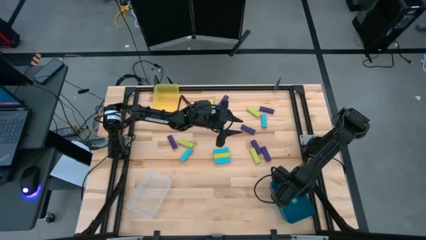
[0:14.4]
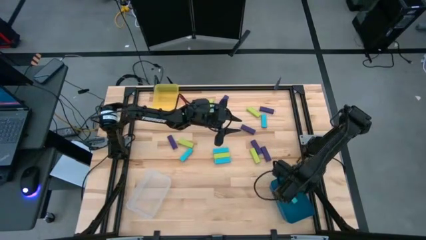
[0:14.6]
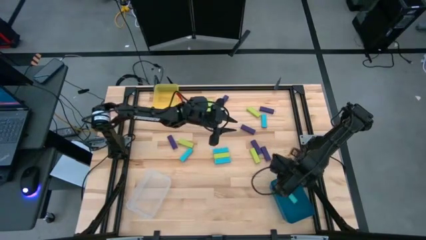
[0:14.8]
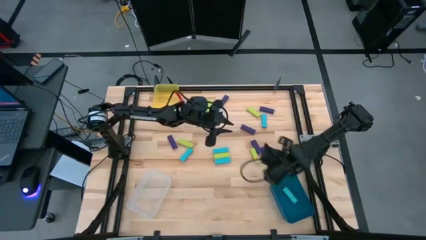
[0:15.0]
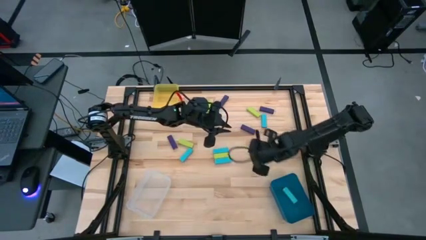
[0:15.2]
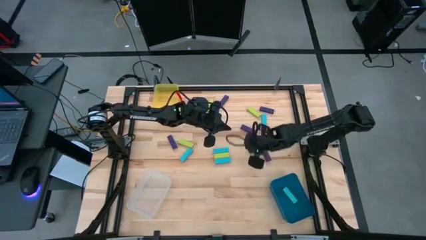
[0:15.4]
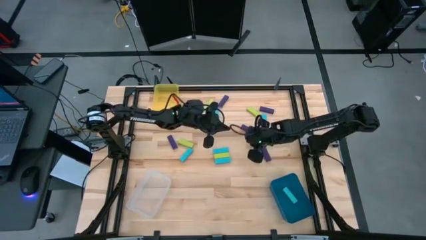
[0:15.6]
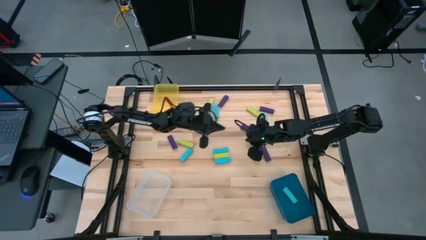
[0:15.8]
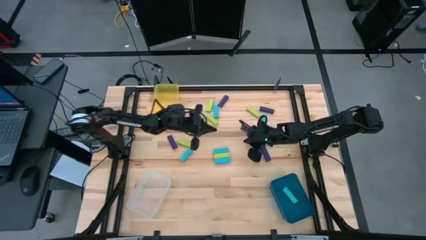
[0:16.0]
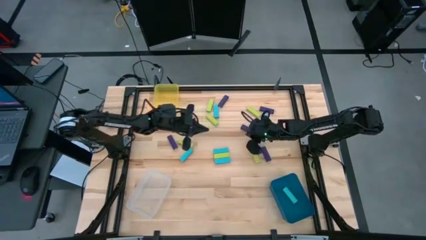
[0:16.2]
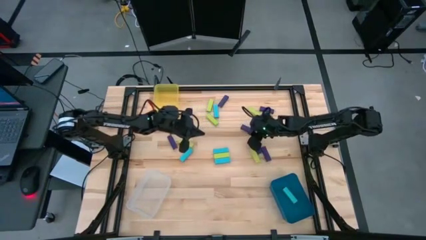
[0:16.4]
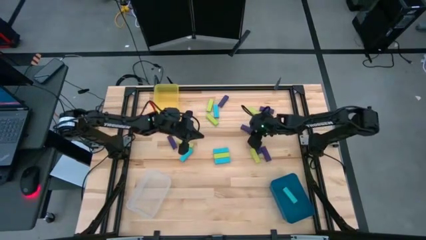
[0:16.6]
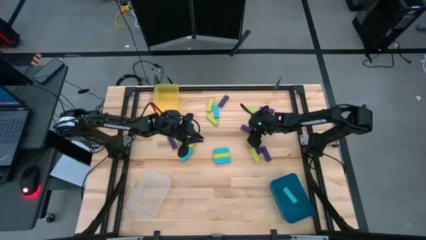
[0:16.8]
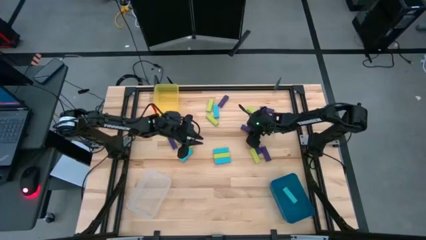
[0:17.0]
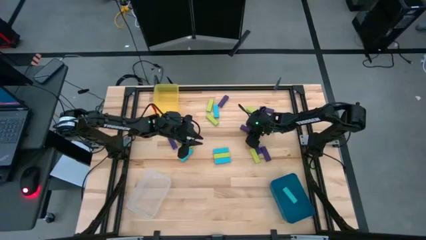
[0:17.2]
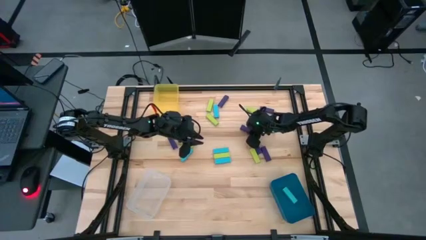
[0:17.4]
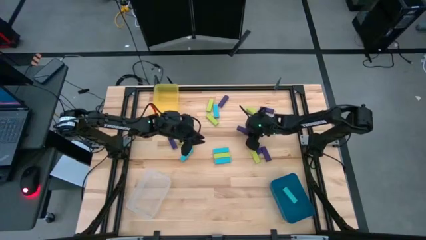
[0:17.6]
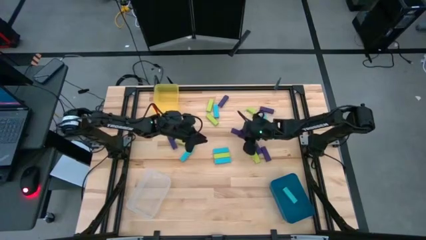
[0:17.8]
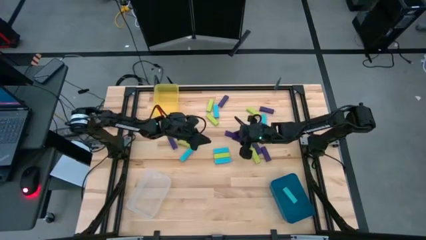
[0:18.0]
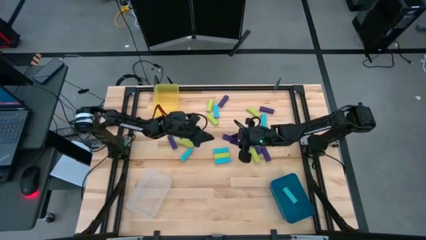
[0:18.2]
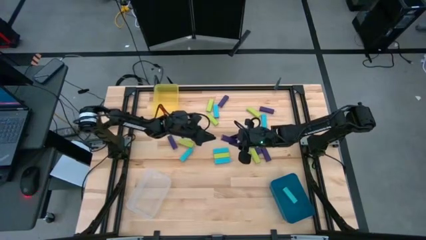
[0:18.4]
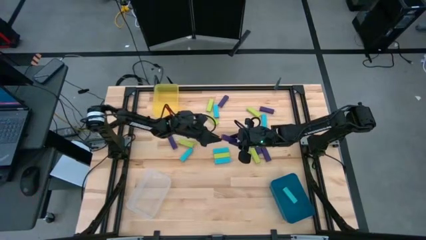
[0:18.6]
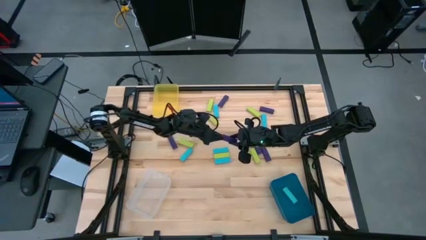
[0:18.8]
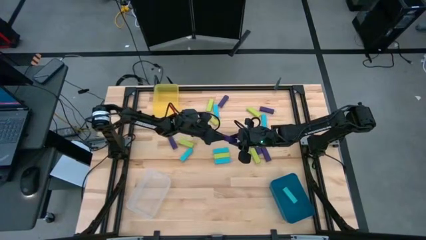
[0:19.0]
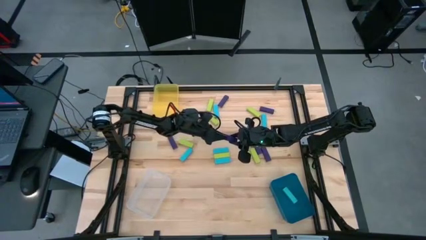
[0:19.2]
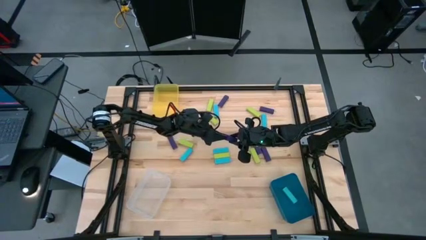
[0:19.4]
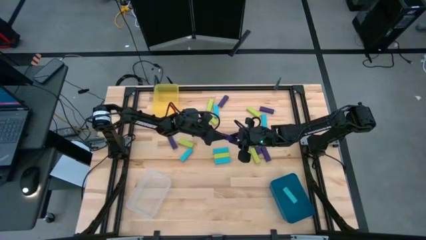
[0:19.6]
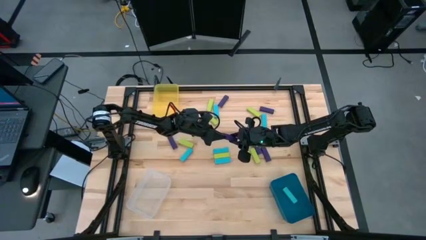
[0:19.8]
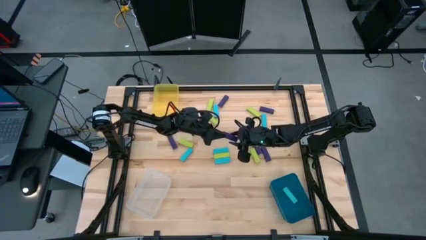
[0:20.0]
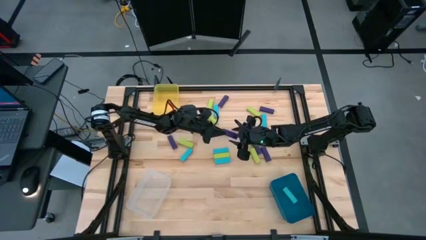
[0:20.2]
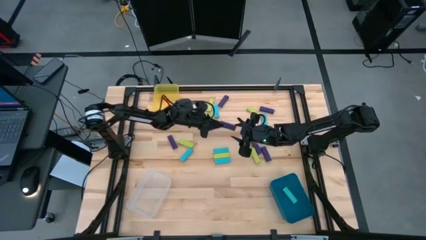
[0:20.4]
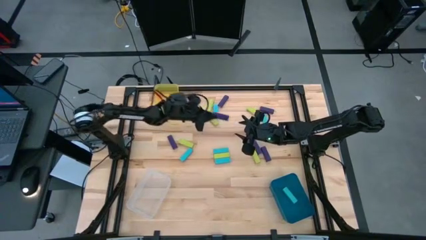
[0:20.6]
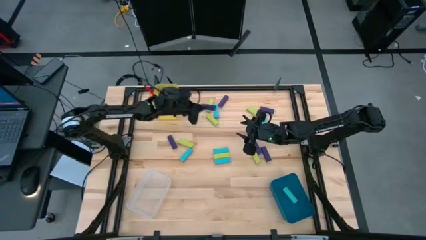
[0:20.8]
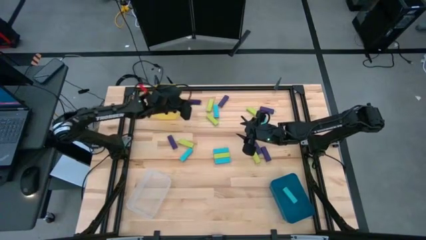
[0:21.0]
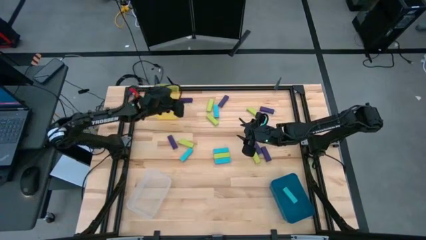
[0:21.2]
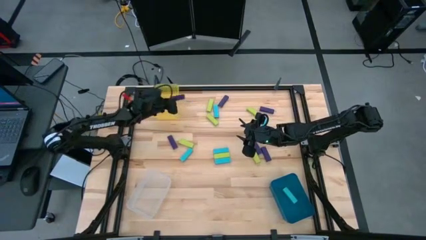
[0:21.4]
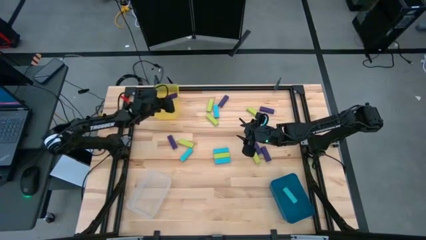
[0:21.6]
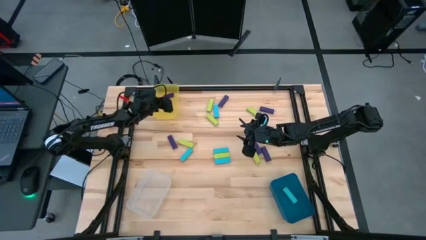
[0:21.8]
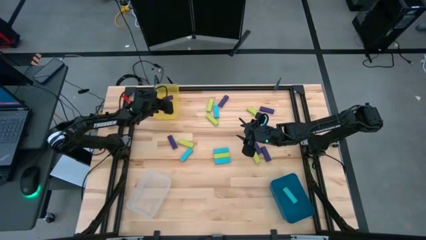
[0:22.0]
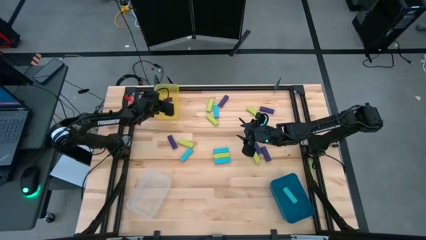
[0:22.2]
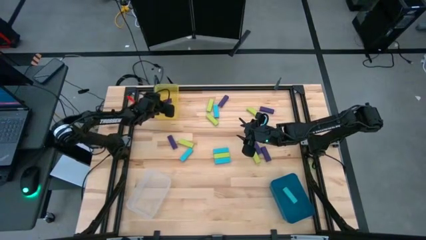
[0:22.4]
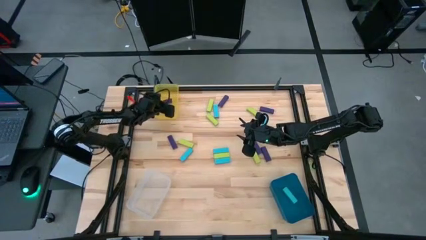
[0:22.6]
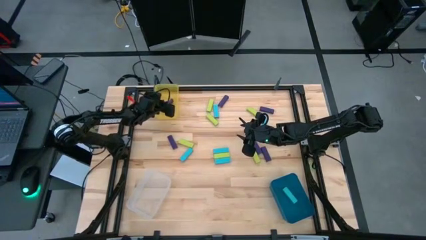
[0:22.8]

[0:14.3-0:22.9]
Task: Sort blocks
Put the violet block into the yellow bin

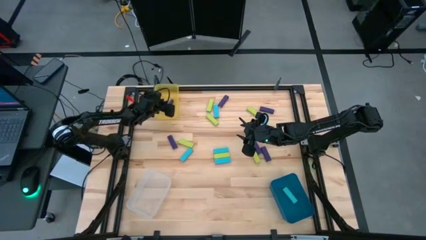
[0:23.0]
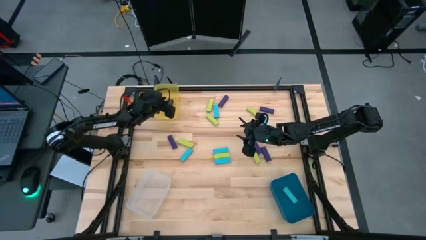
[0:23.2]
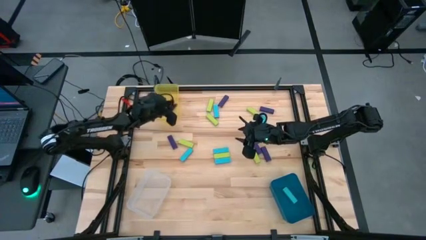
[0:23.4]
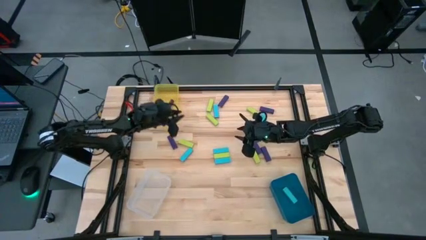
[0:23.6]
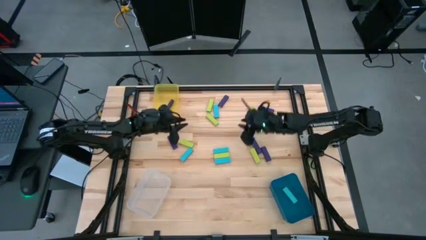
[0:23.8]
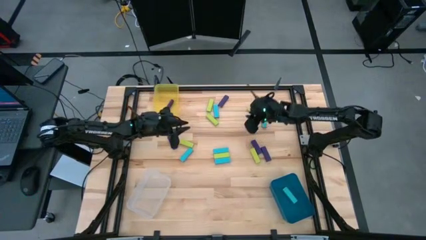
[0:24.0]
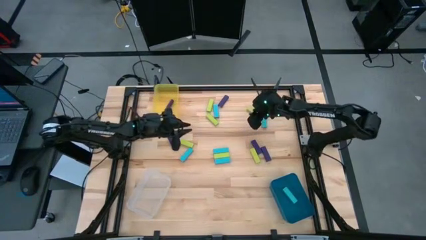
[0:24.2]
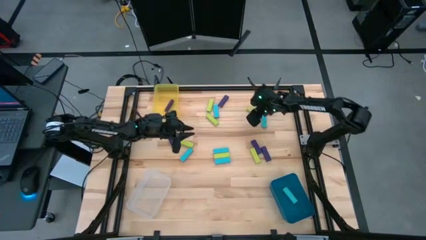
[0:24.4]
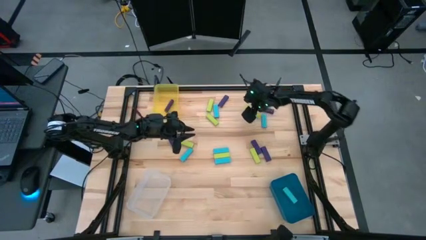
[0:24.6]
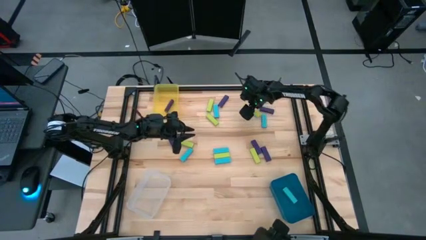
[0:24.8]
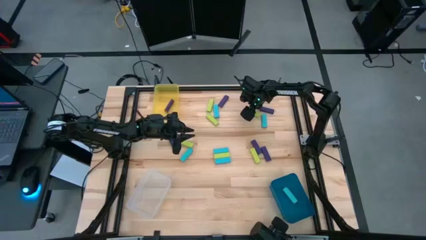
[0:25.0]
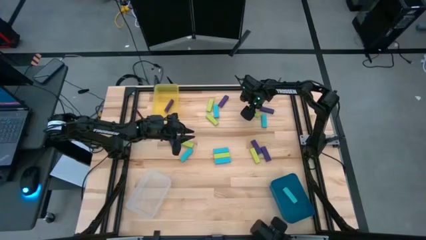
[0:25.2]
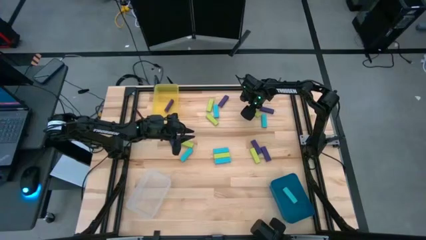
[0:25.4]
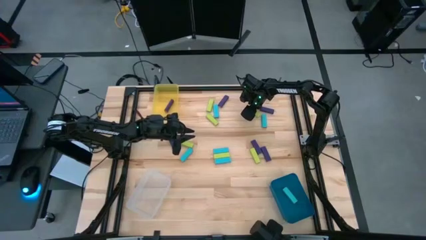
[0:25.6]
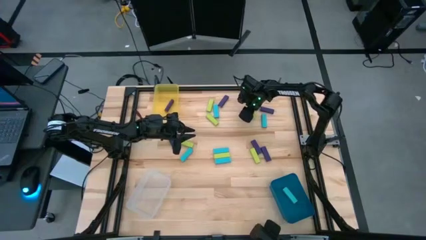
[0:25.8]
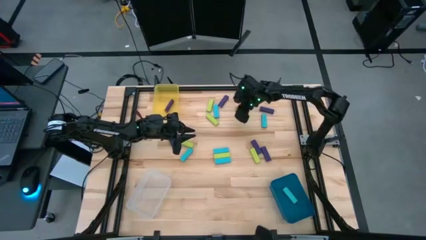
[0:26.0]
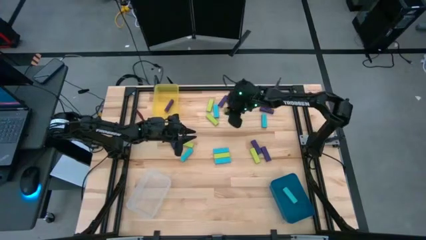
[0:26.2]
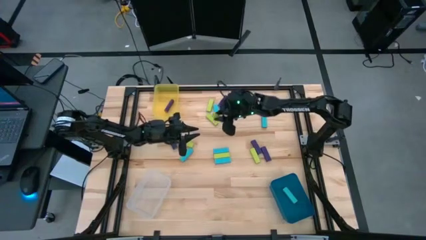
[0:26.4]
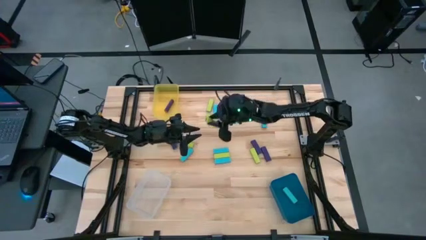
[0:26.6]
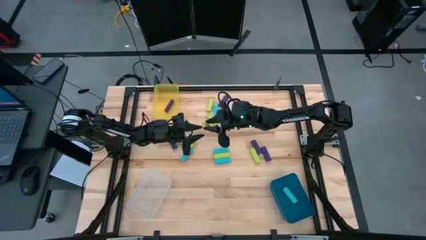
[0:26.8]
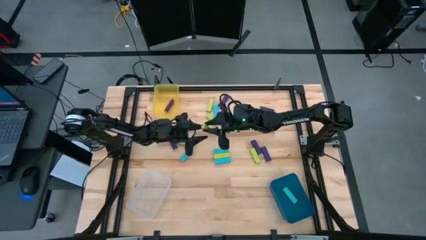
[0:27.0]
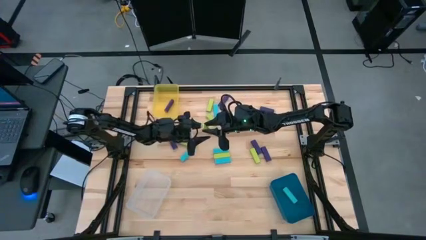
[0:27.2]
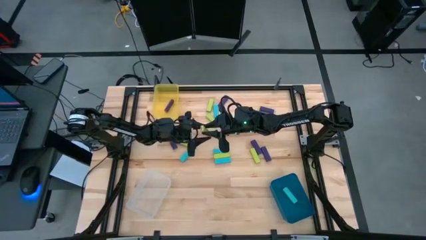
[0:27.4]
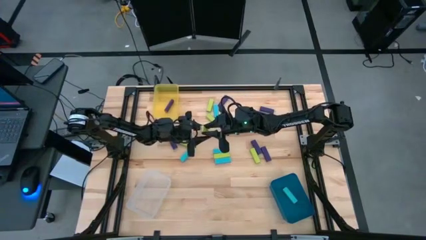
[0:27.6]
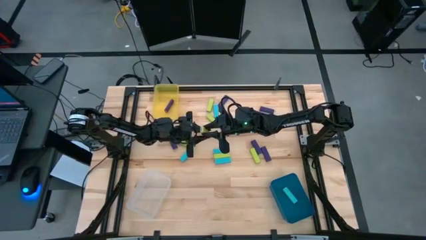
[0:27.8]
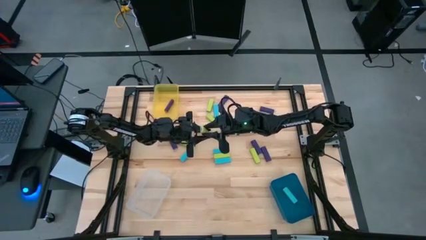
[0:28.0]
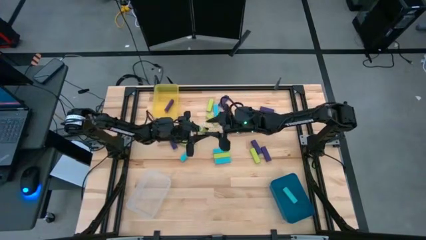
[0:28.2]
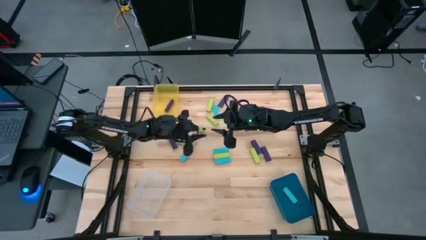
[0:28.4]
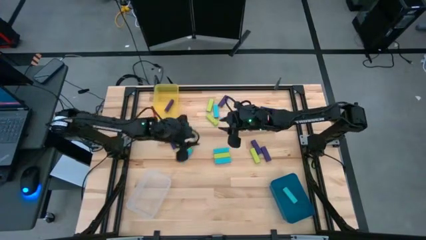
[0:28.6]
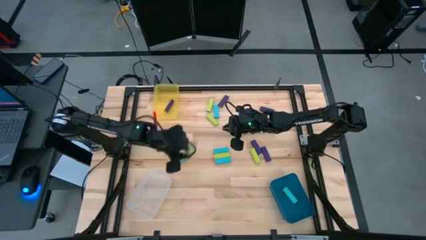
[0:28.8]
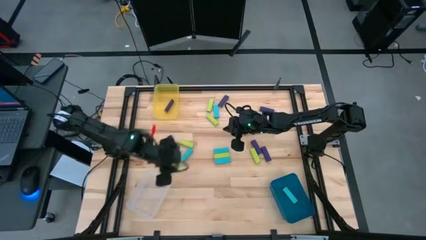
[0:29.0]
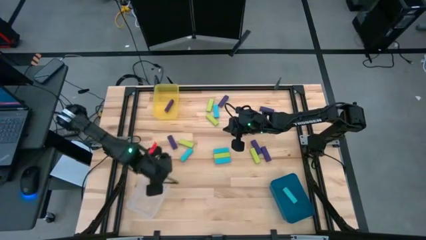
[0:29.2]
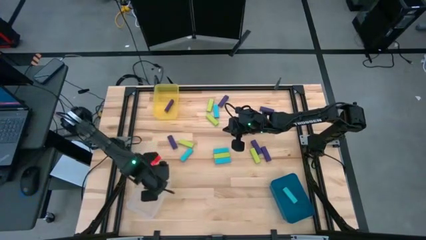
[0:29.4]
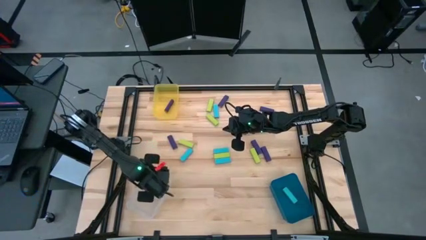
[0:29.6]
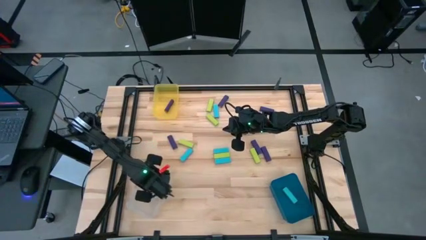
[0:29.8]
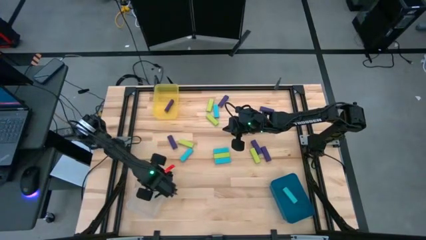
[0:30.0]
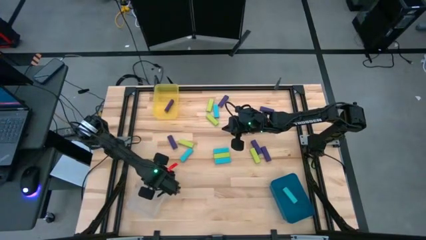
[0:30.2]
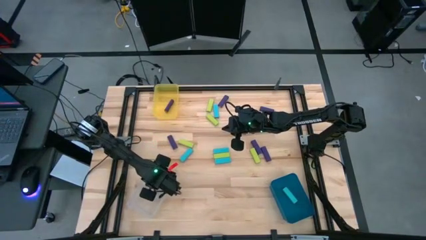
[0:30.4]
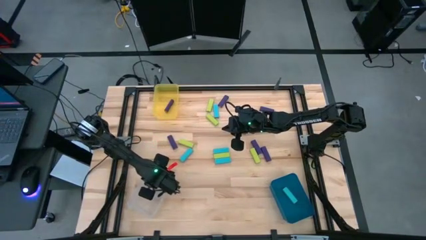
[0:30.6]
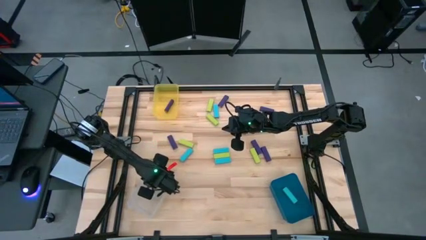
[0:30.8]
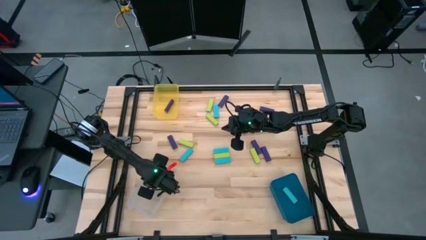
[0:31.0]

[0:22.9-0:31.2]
Put the green block into the transparent bin
